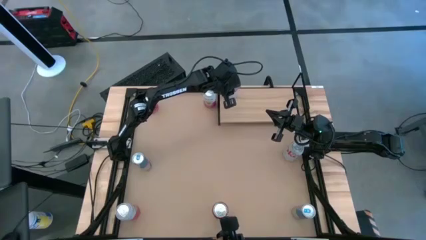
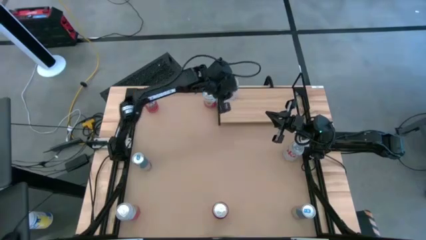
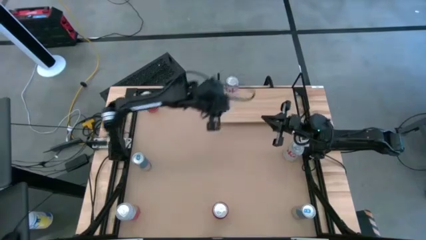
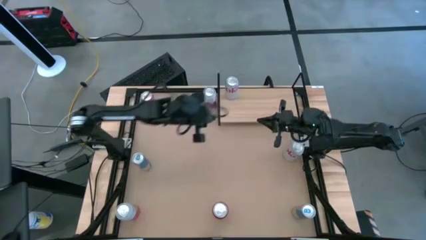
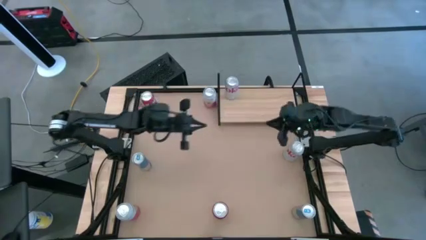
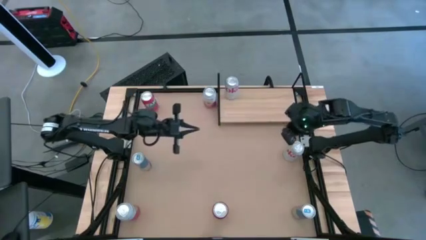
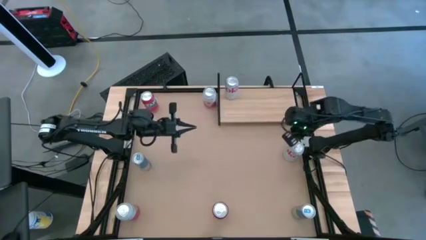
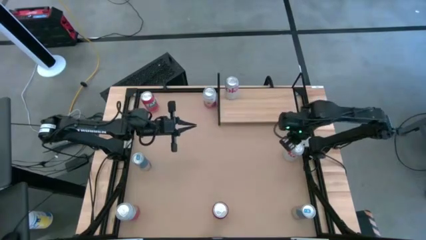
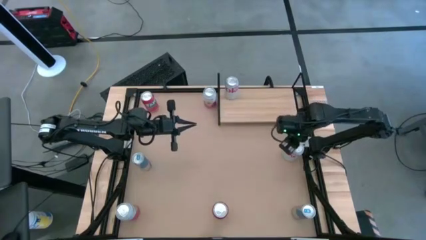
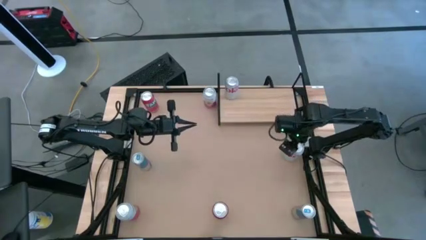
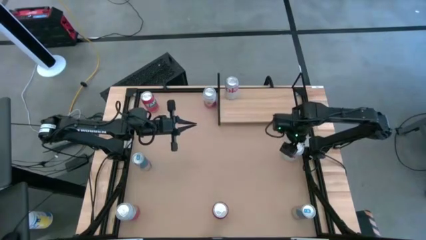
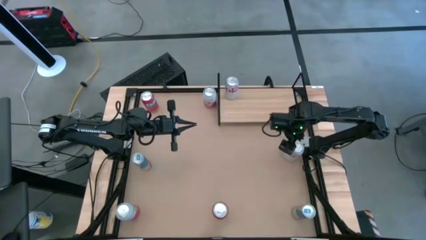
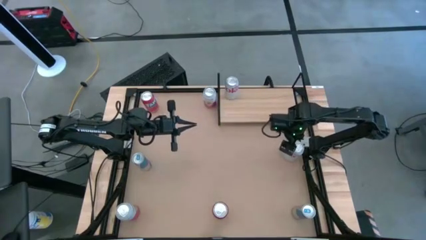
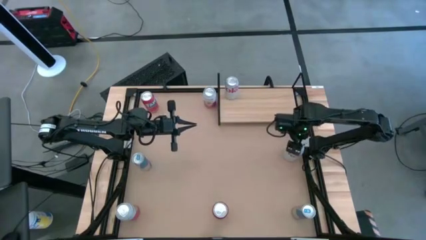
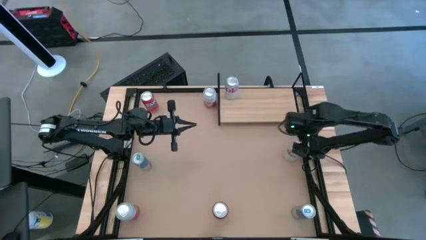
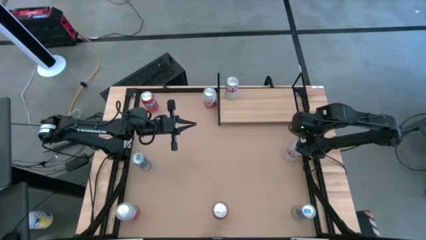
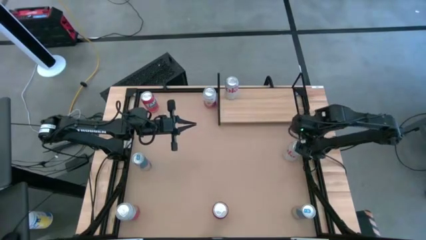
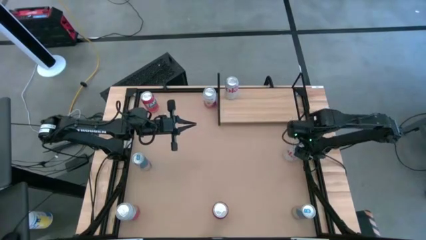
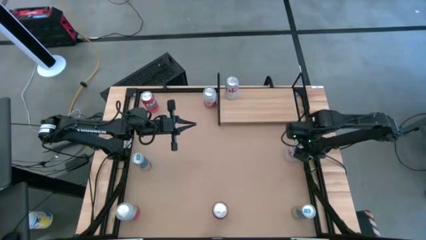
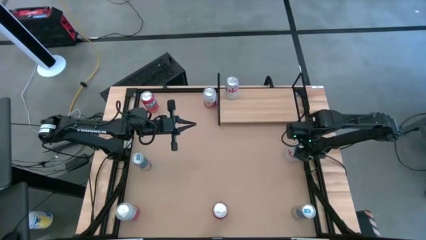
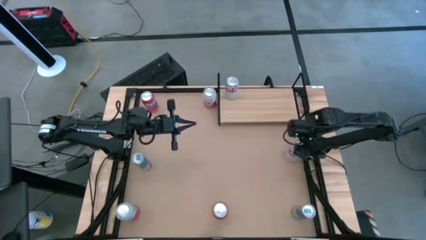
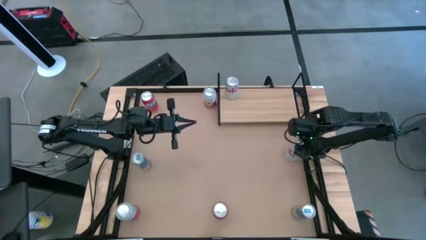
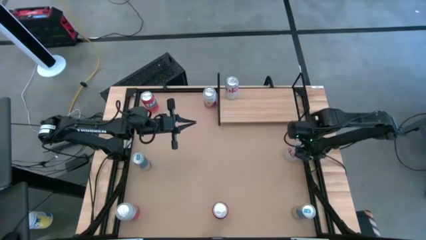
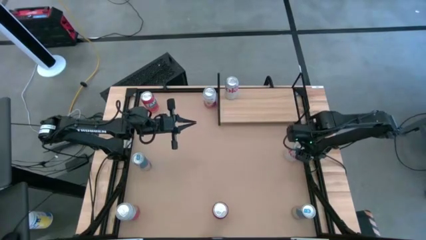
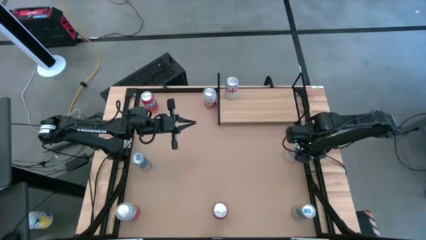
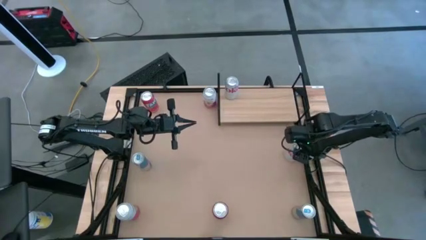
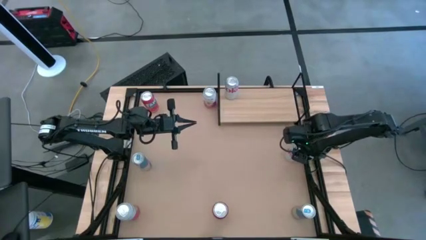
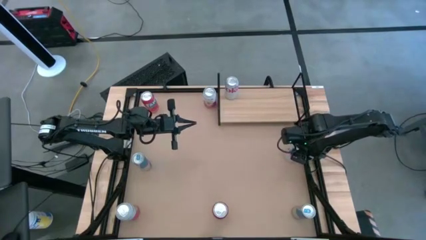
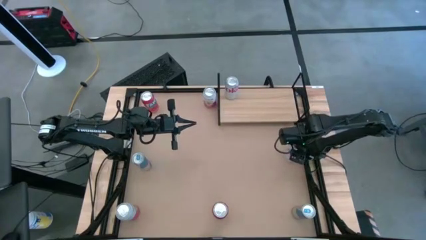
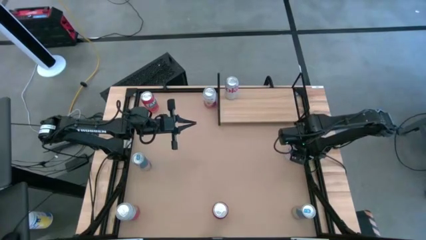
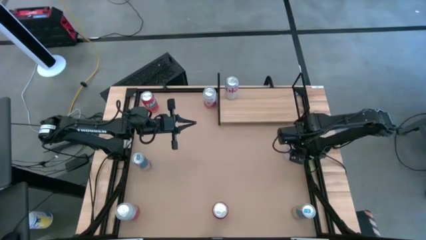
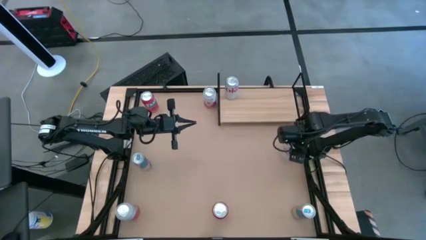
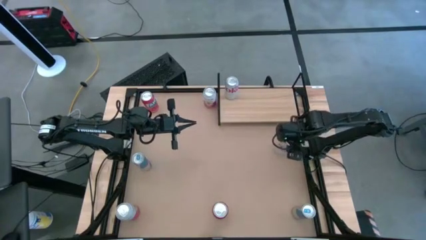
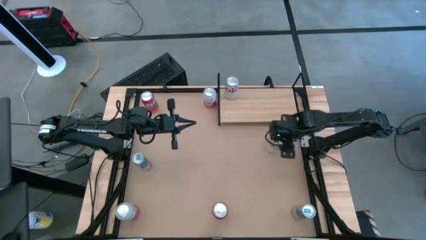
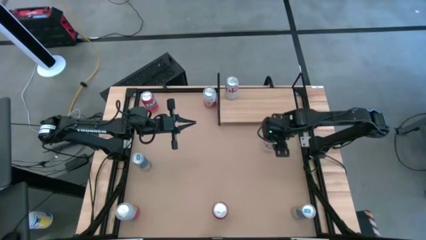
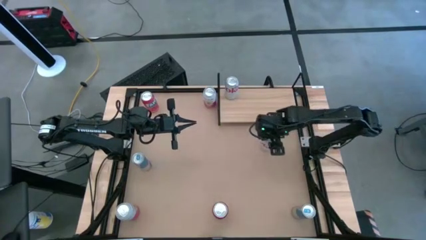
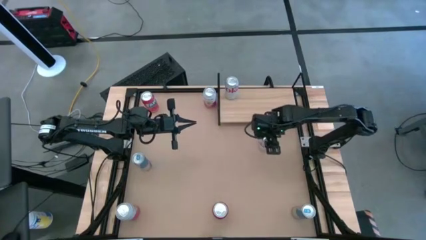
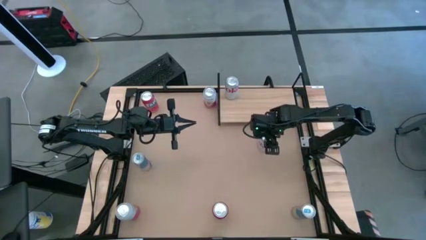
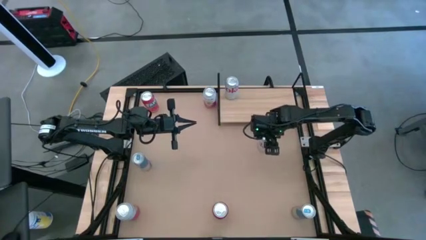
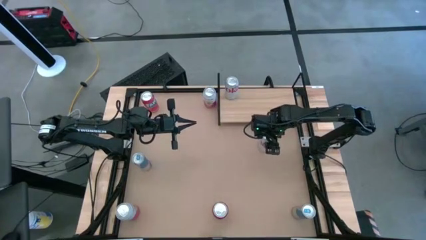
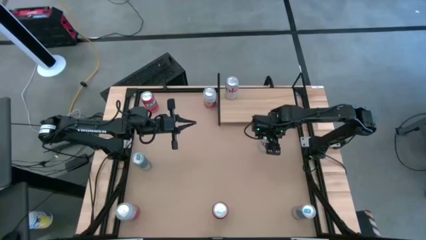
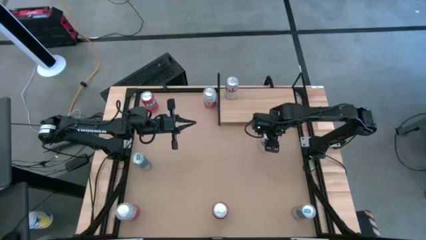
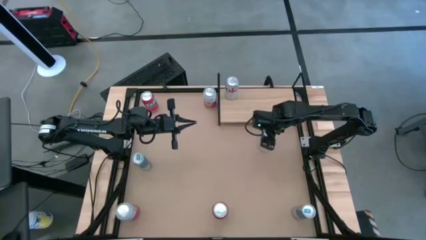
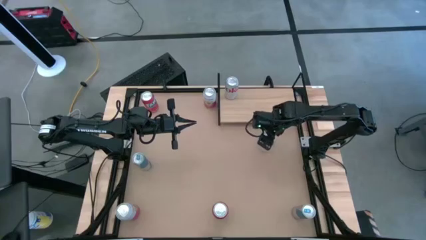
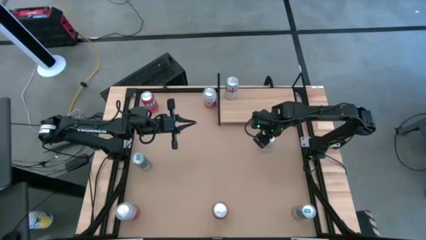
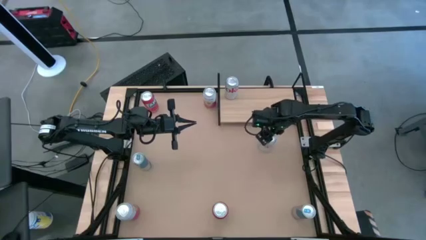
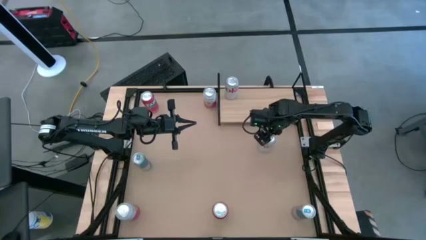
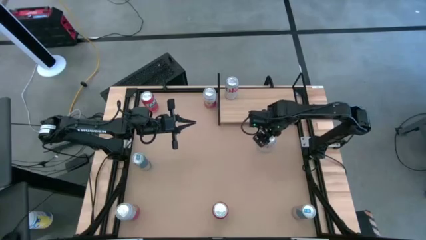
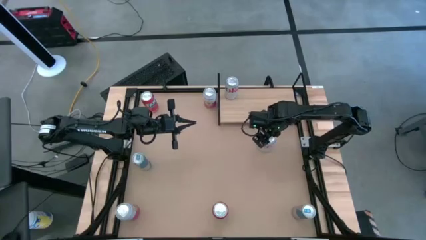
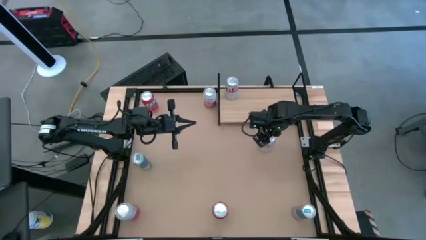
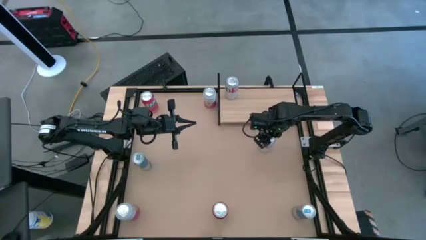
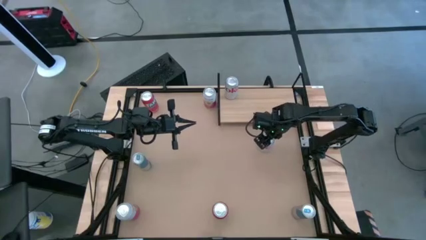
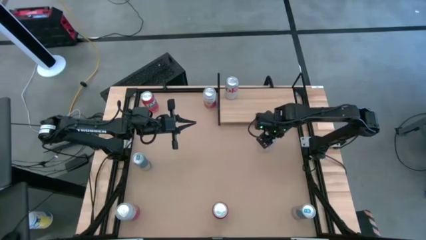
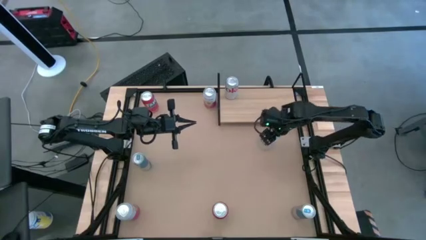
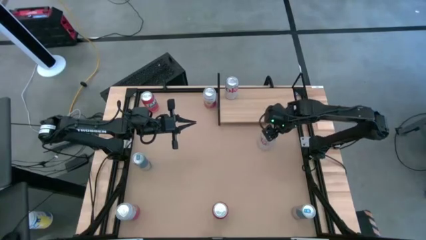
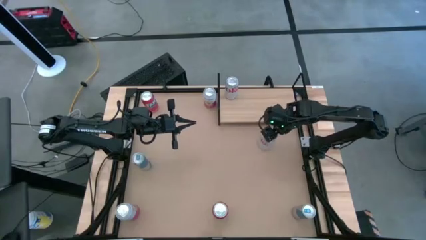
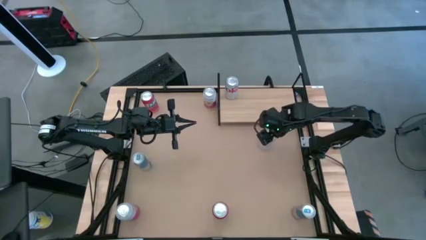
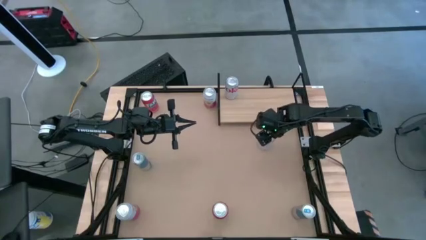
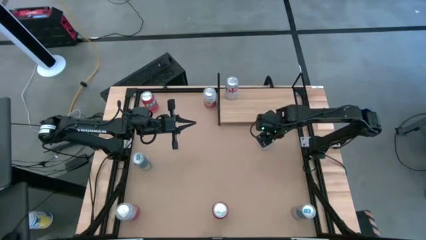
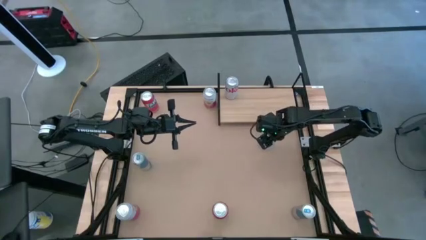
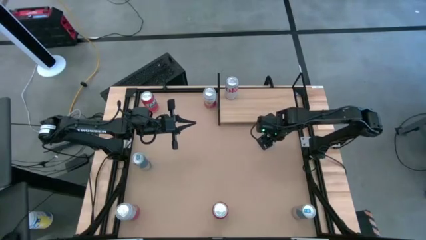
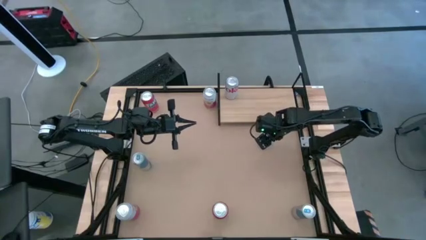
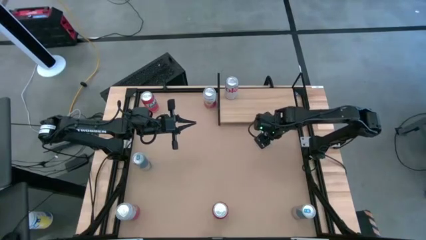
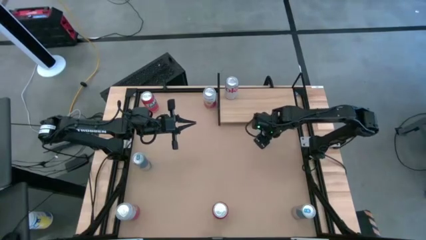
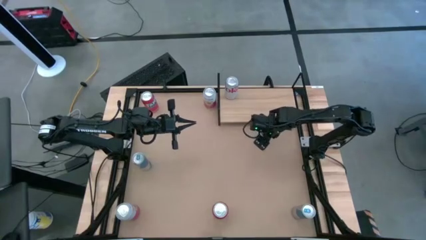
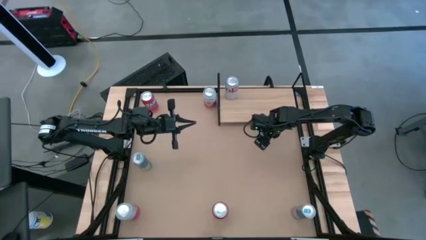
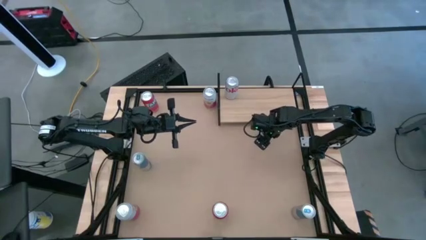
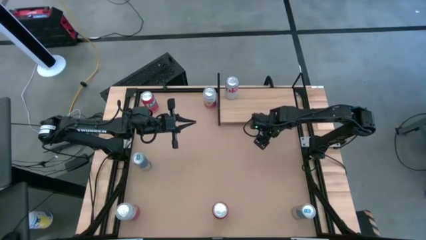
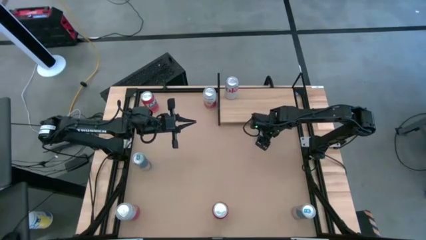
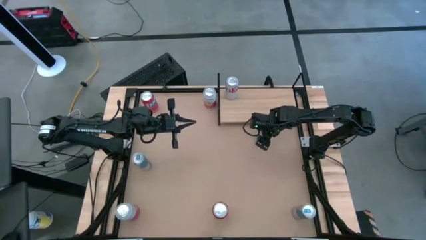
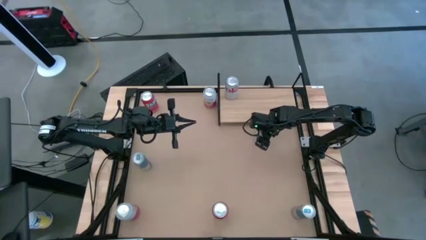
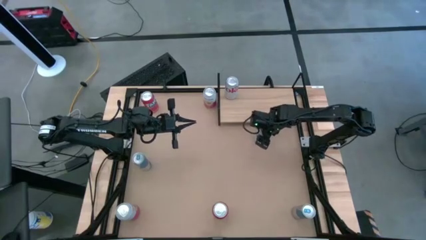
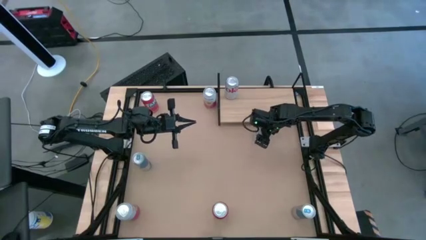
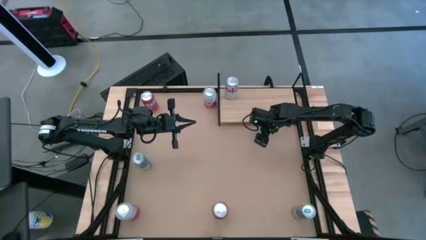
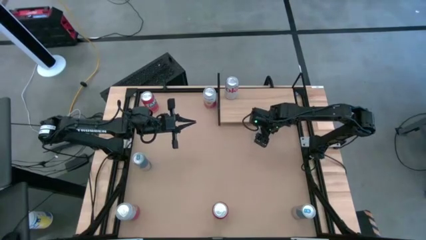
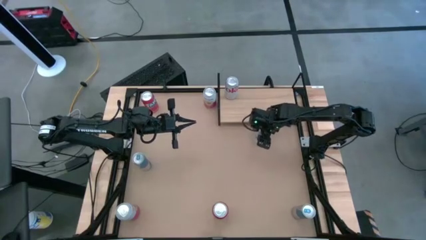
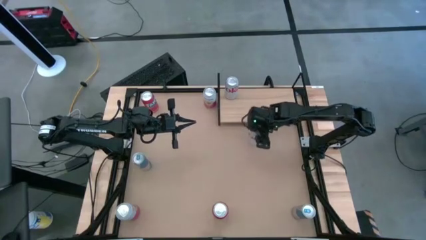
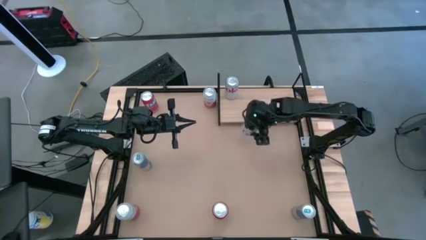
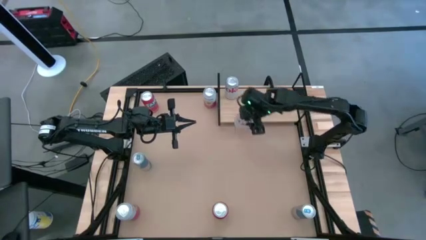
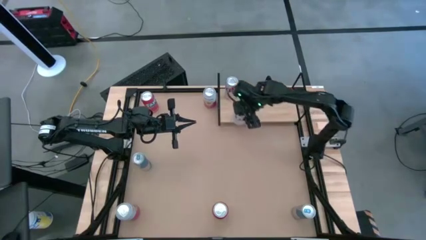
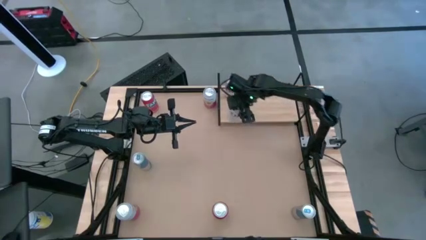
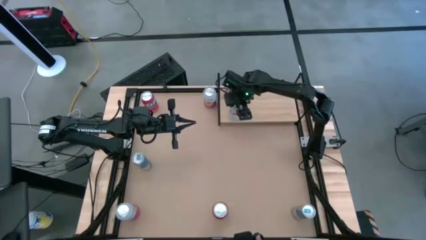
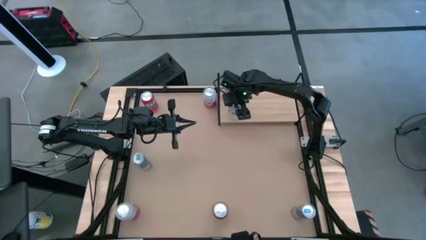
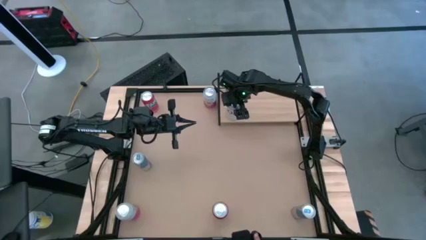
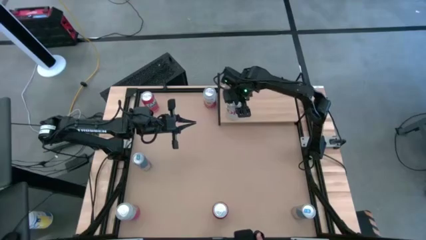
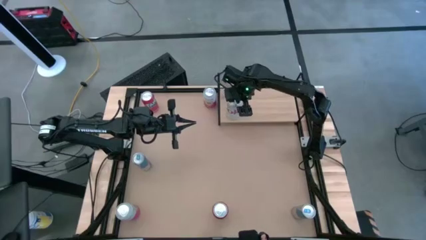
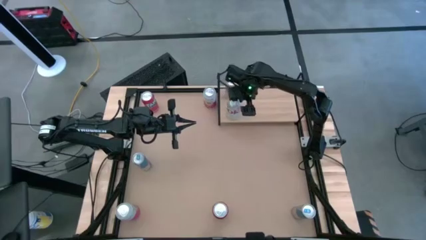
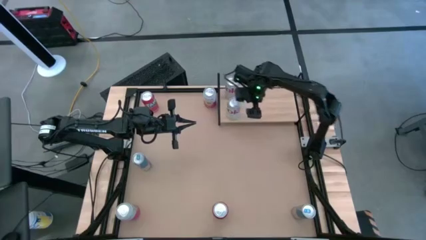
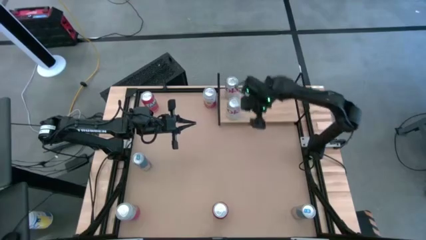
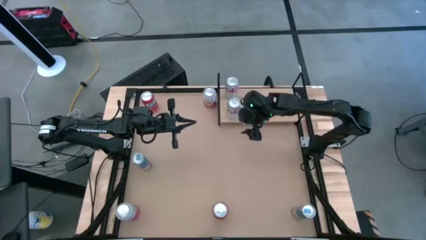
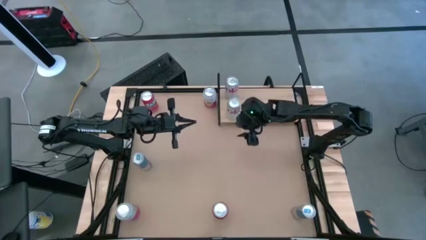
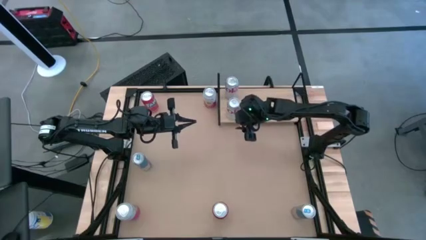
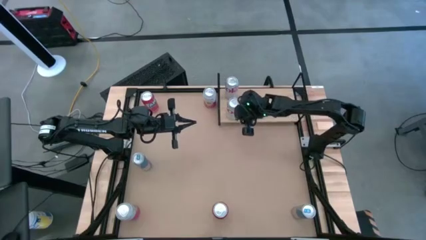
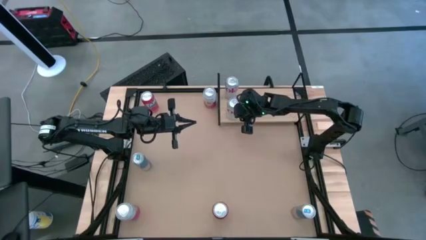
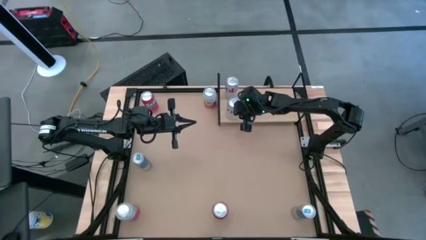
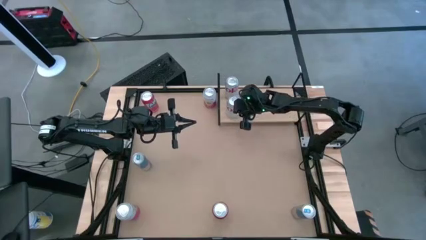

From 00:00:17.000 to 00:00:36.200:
Task: Place canned beverage on shelf
Put the red-silver soda can on the shelf
